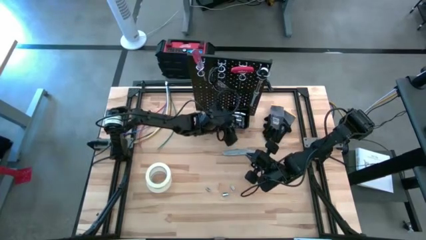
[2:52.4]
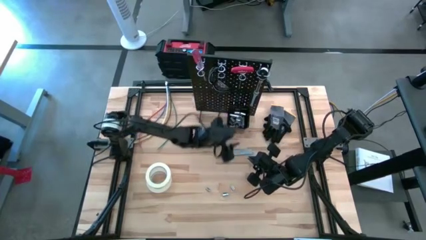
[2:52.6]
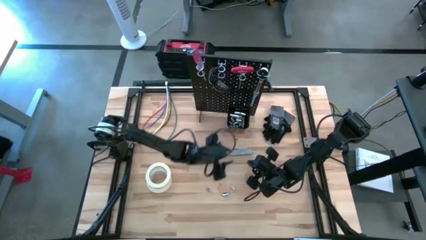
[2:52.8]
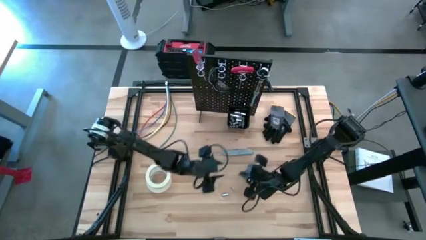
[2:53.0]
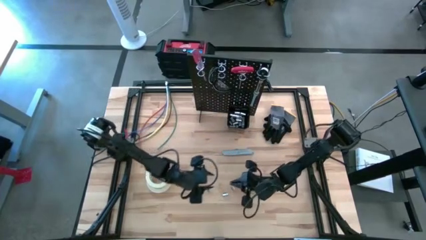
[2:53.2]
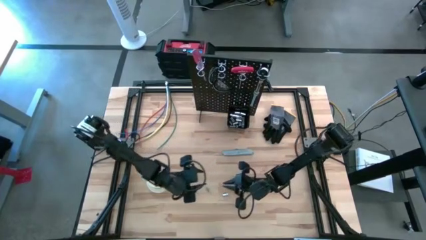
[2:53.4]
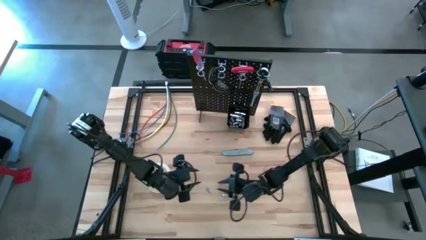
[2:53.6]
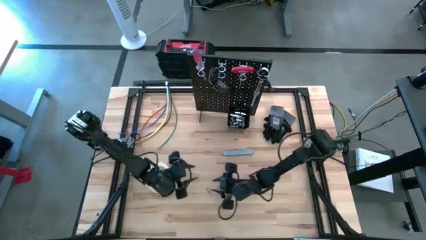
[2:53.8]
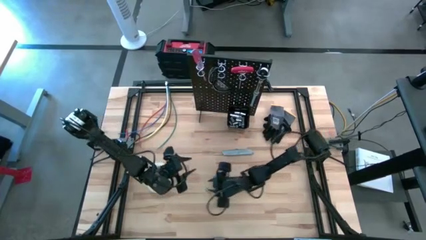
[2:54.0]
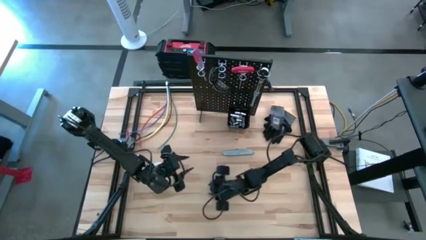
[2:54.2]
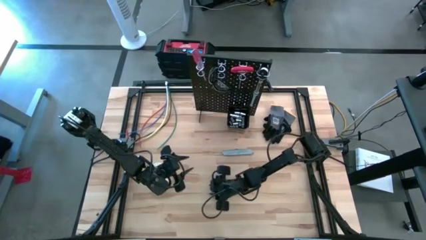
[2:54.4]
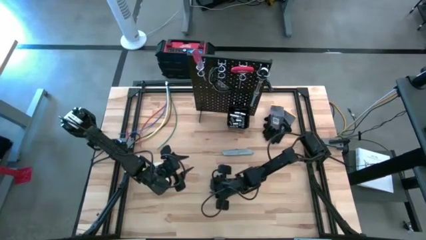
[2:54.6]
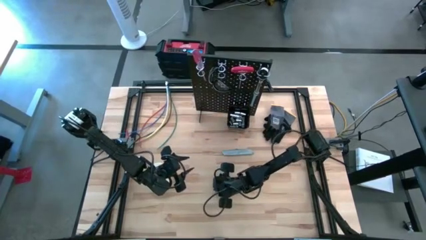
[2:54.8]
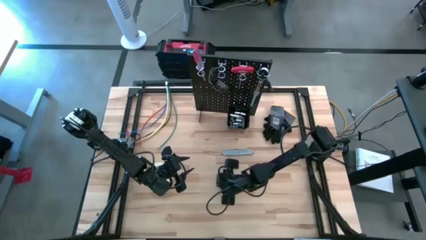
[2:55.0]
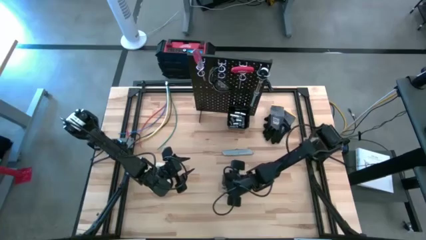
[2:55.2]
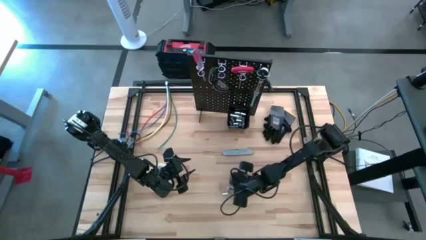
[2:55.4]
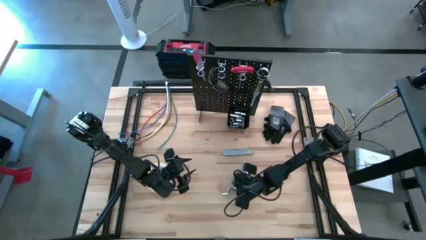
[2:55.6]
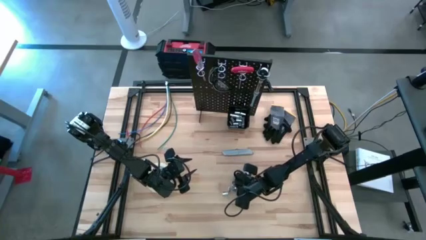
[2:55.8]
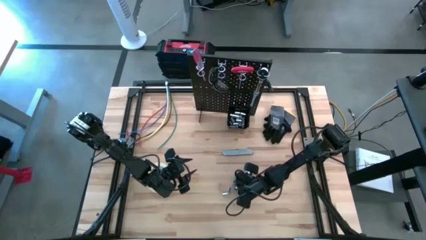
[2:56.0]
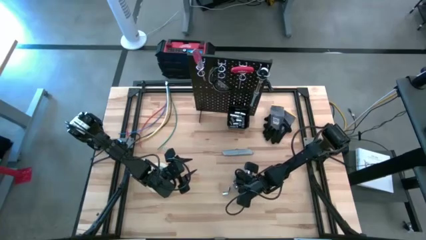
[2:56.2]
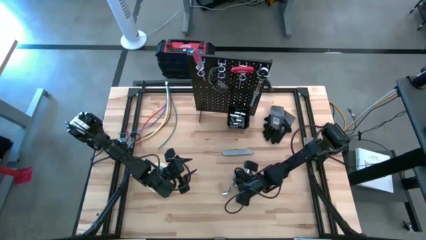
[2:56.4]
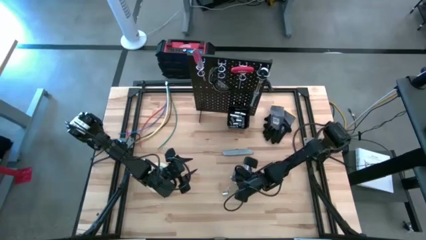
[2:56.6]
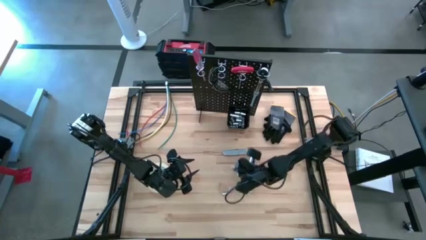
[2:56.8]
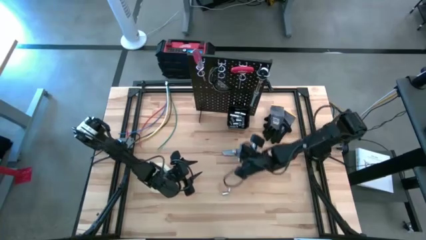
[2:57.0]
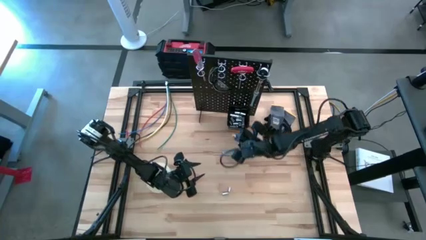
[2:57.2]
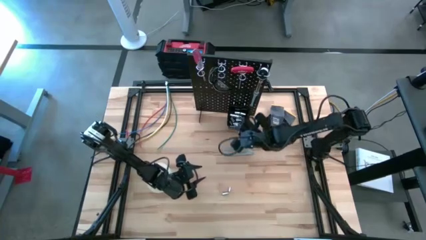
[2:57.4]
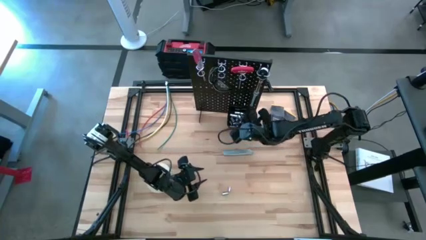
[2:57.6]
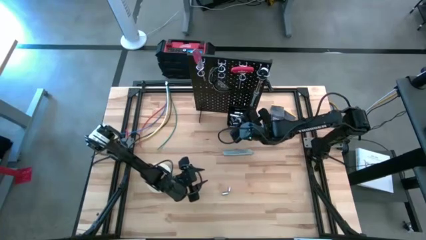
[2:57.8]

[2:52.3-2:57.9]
Task: Hang tools onto peg board
Put the socket into the black bin on the peg board

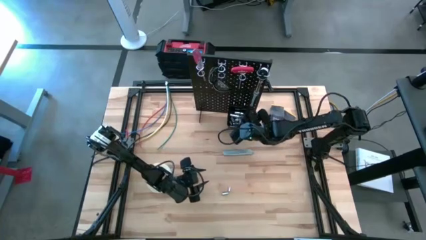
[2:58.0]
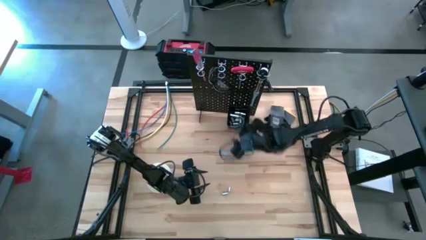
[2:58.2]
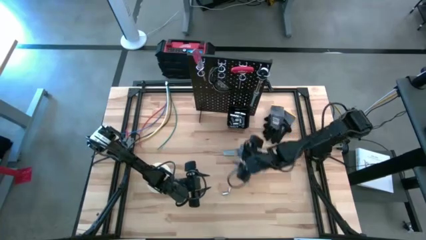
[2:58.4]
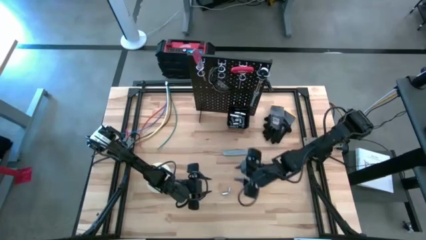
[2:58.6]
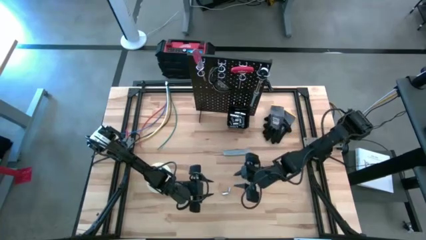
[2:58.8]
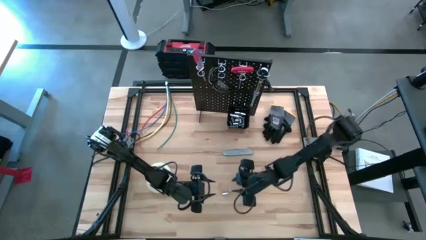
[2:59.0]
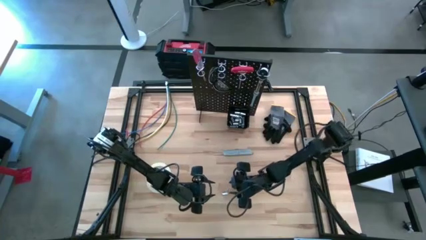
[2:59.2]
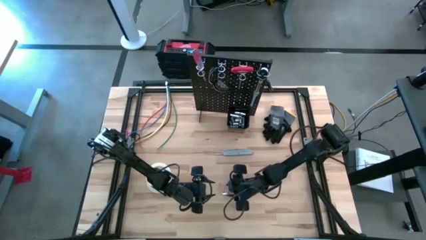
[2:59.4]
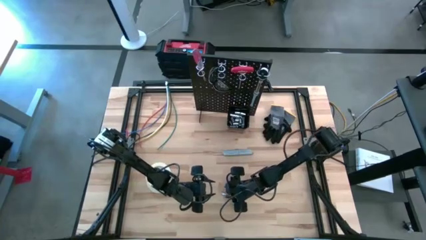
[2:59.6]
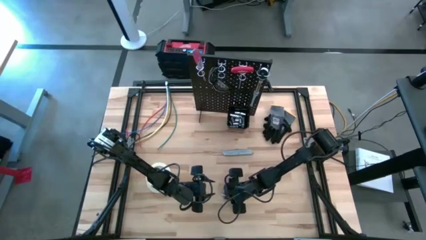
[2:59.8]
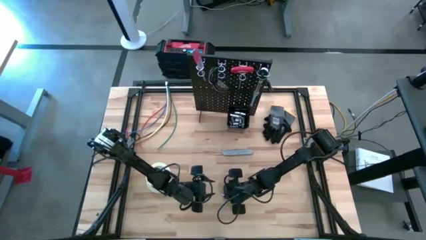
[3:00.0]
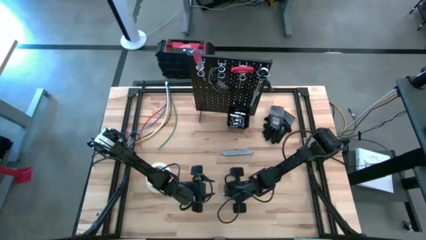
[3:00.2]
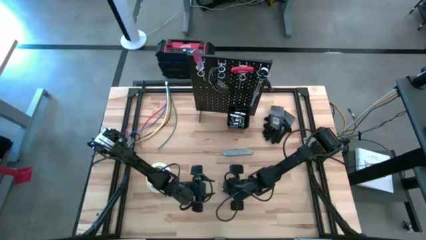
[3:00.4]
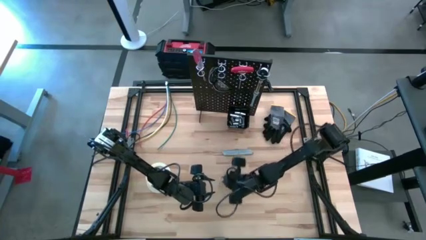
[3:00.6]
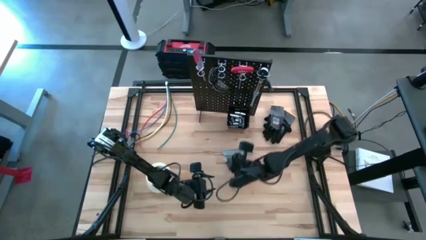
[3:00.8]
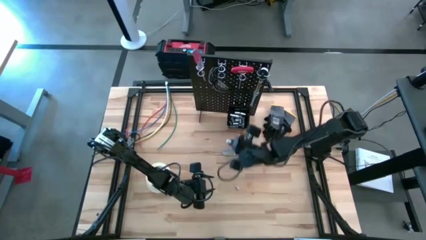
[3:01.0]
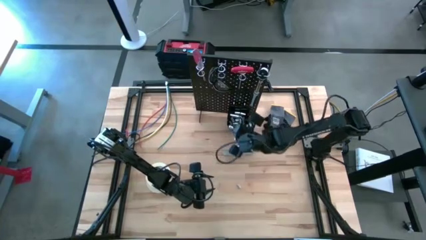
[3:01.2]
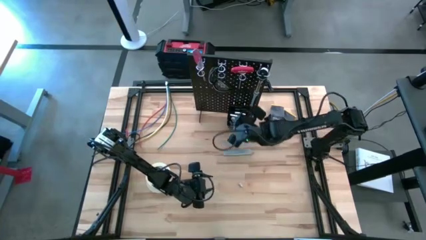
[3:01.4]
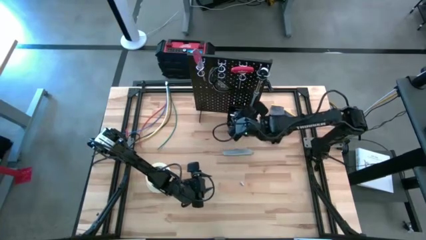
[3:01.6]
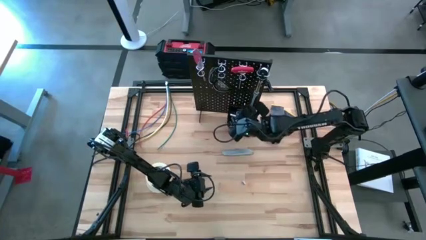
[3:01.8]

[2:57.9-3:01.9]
Put the socket into the black bin on the peg board

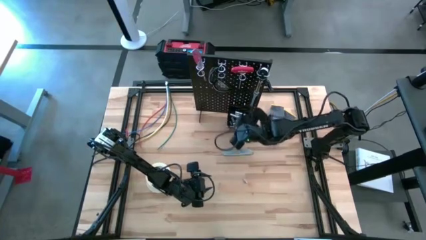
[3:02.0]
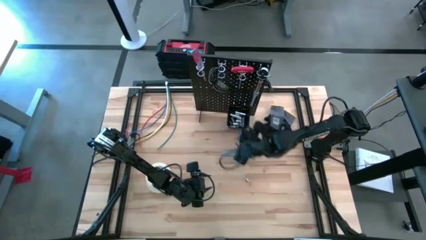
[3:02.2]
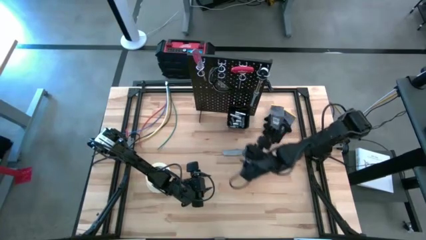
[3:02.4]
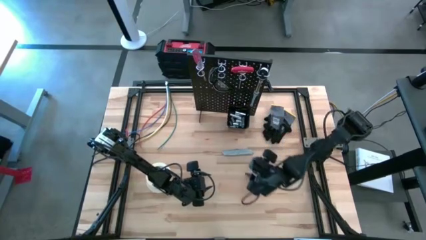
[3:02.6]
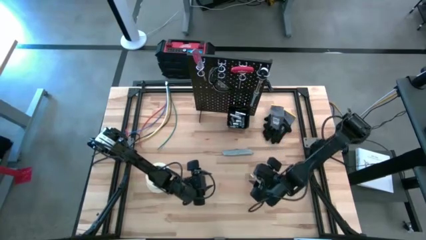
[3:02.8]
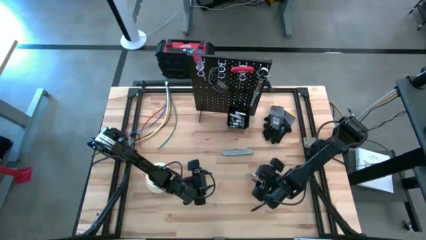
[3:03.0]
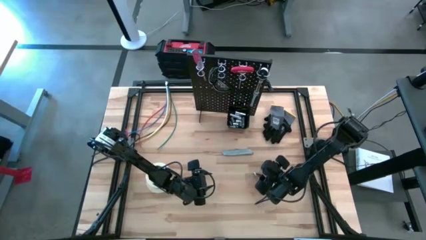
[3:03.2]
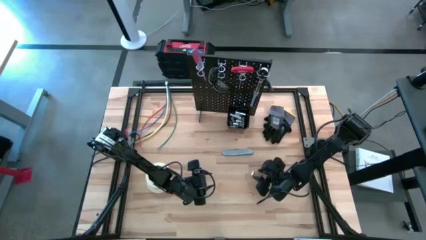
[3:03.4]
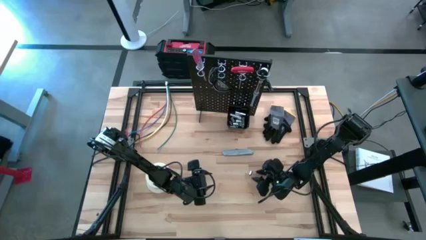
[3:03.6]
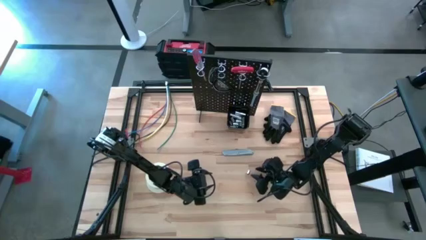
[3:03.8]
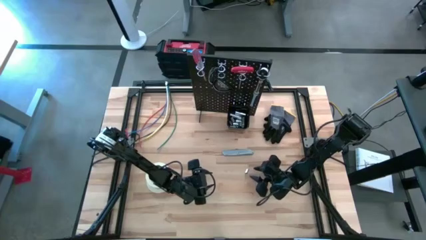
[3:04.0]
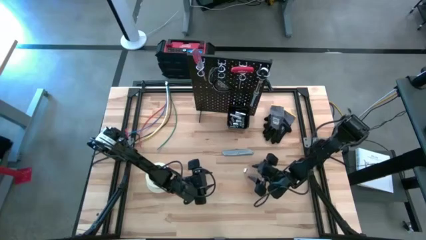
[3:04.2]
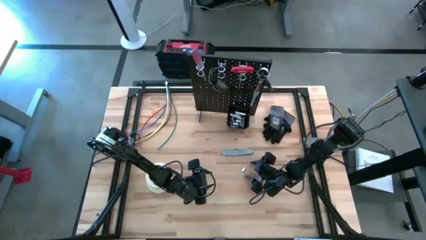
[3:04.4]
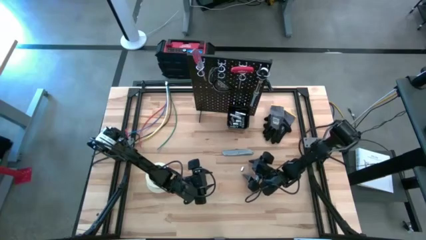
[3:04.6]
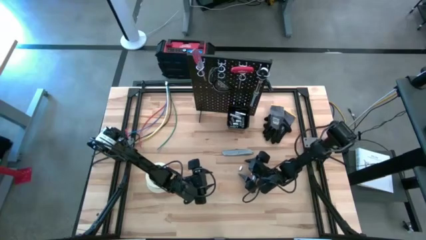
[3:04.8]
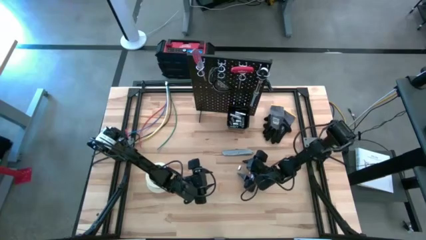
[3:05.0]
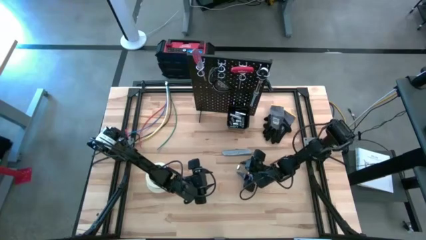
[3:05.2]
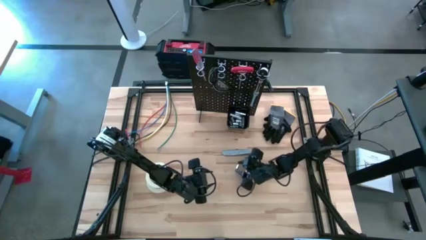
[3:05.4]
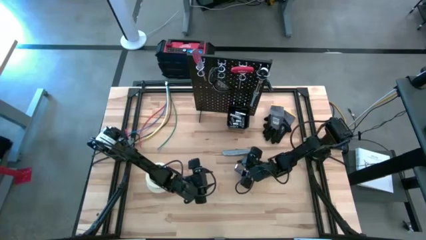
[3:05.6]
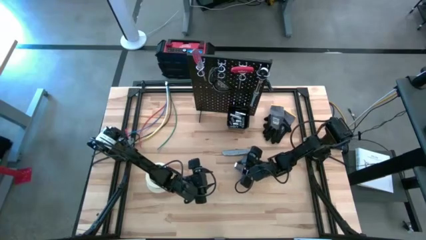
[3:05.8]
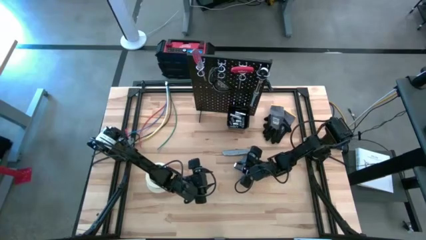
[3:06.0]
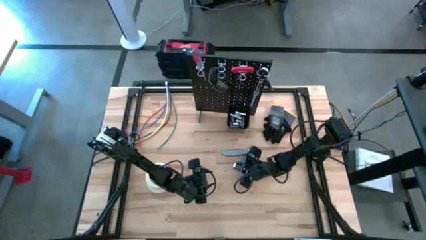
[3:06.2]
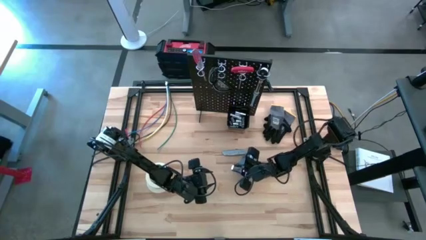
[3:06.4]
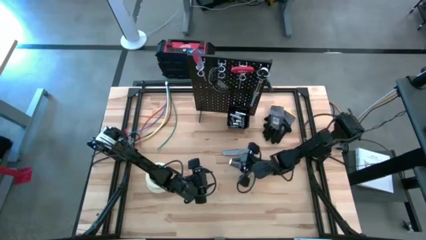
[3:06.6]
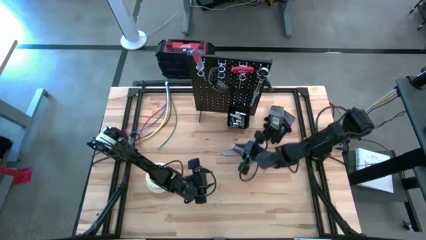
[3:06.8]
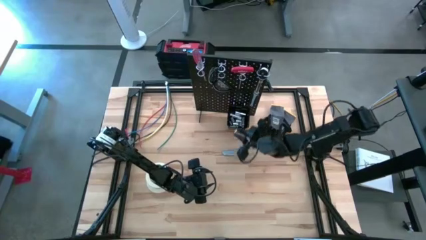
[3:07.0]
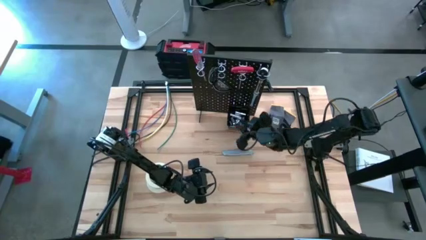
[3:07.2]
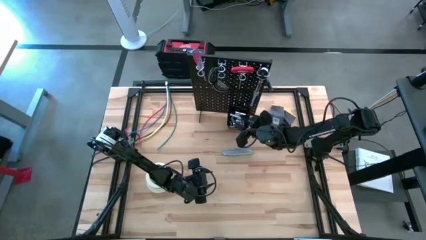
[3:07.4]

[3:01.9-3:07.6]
Put the socket into the black bin on the peg board

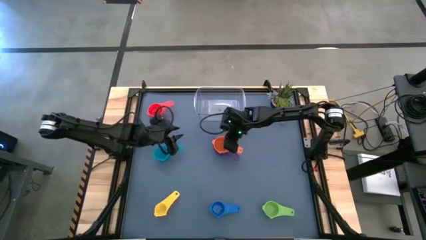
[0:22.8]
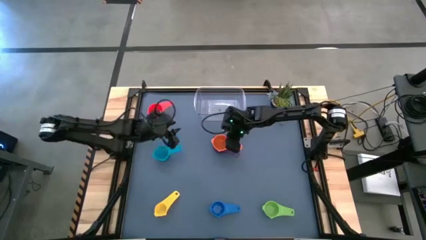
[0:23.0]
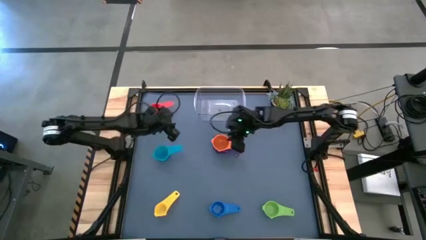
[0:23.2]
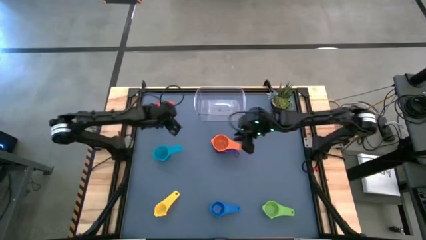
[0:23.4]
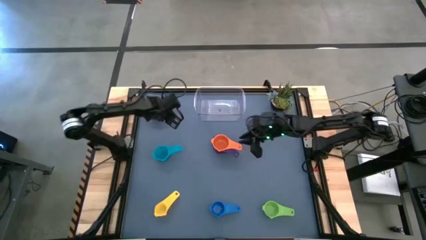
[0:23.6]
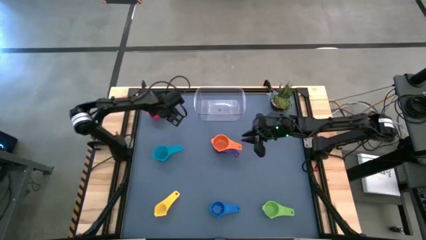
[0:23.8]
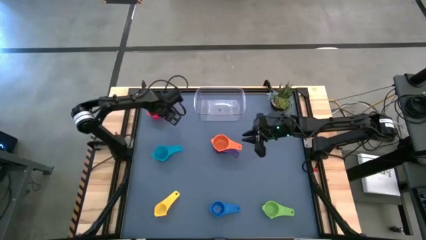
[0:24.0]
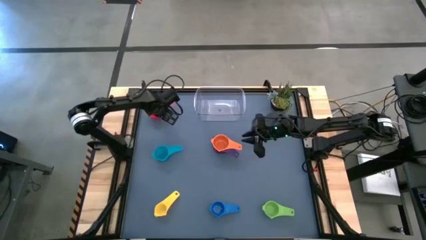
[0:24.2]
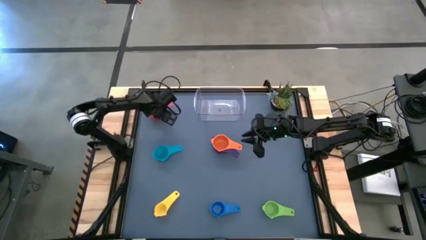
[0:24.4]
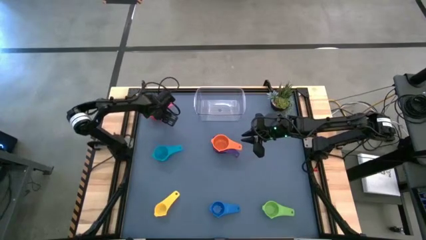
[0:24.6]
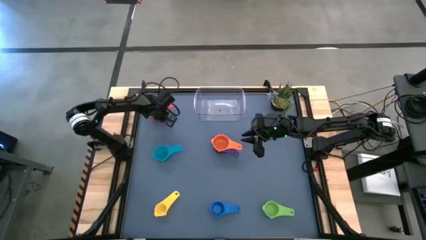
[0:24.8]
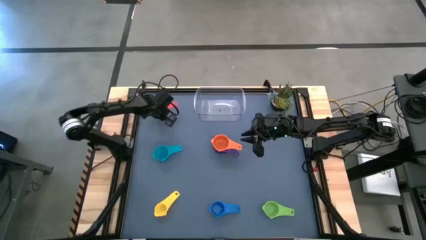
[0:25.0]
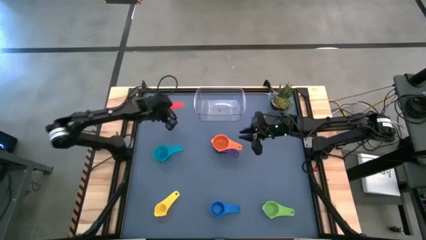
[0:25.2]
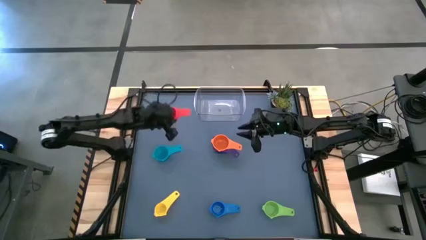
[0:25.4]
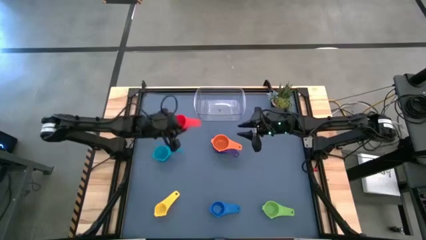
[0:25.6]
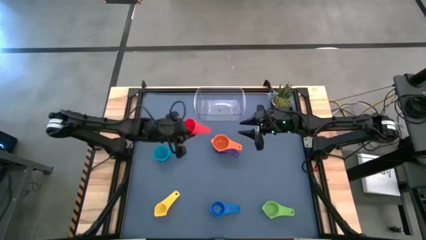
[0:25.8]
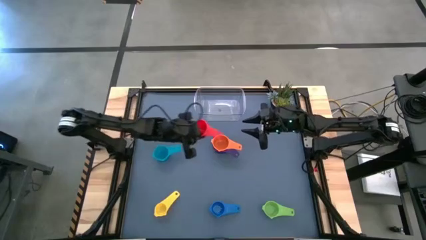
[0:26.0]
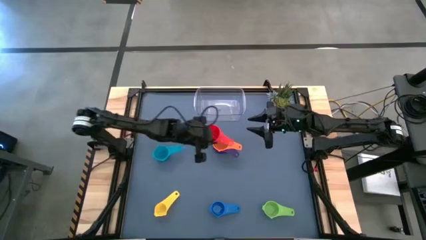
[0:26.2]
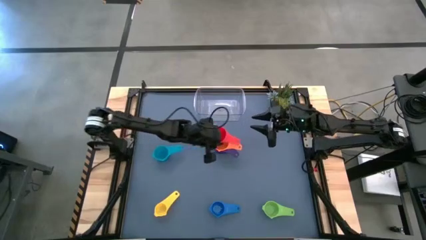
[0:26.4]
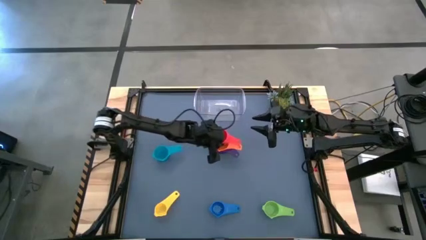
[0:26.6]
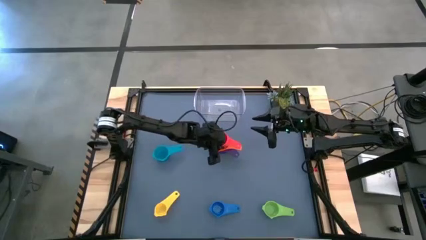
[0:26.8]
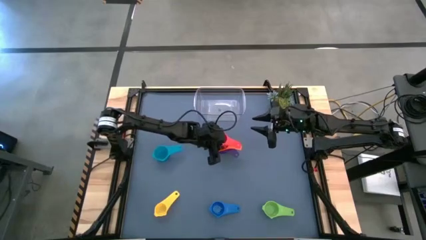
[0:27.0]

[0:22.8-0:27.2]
Task: Nest measuring cups in basket
Stack the red measuring cup on top of the orange measuring cup
